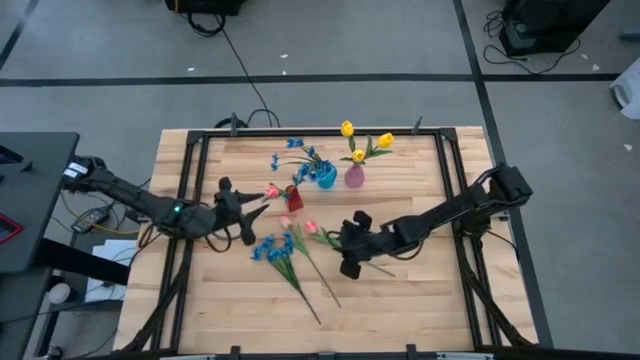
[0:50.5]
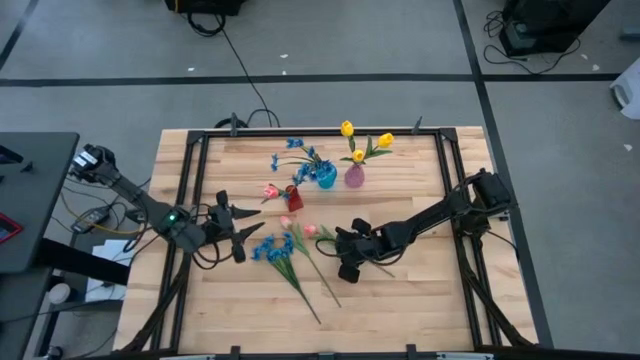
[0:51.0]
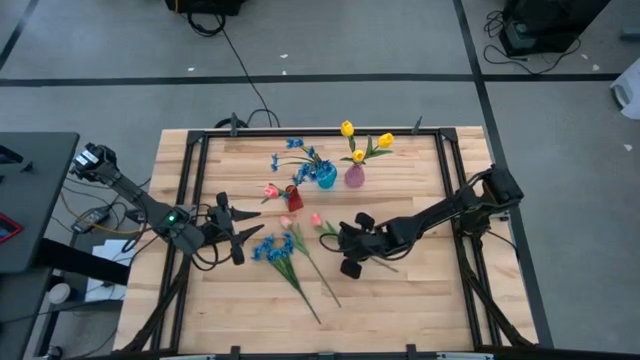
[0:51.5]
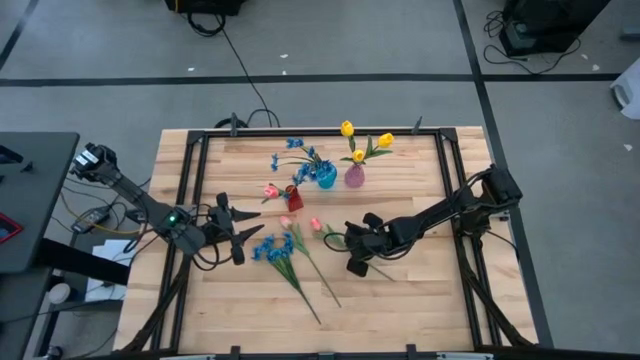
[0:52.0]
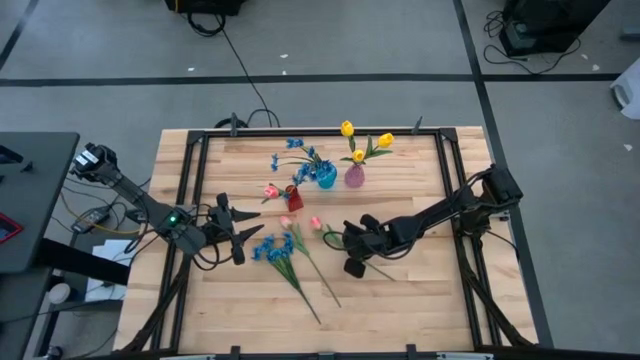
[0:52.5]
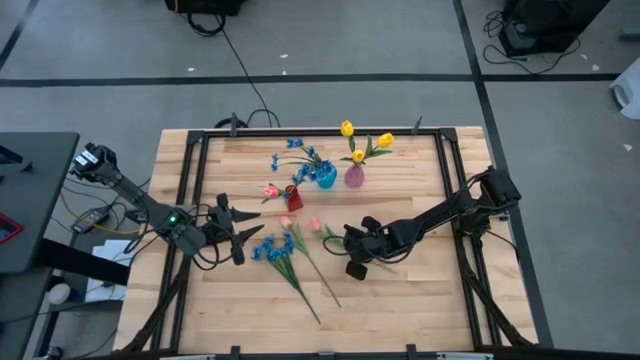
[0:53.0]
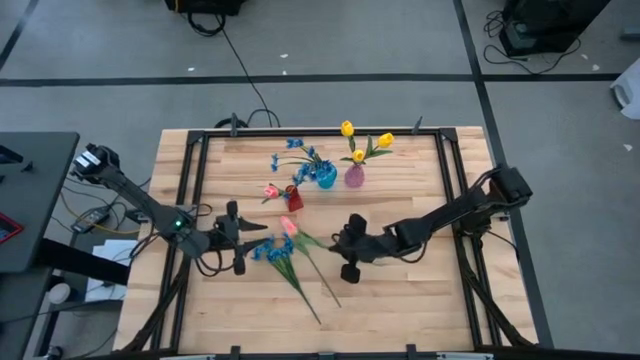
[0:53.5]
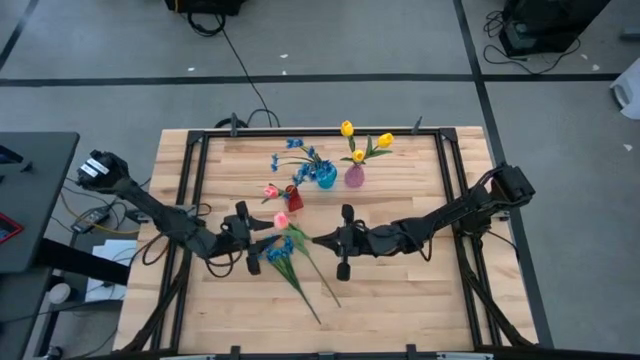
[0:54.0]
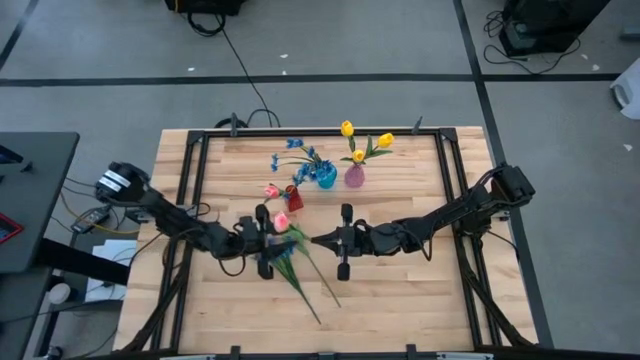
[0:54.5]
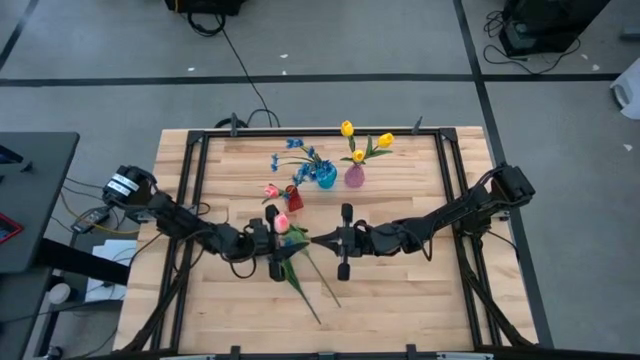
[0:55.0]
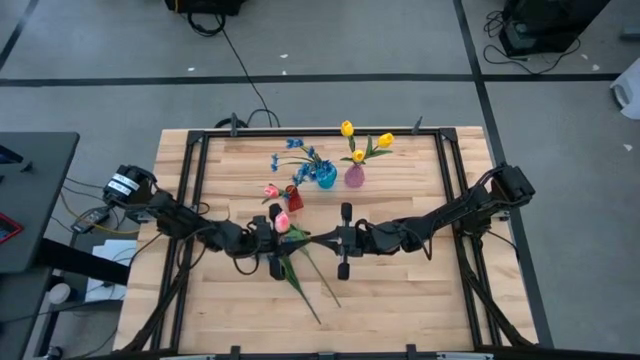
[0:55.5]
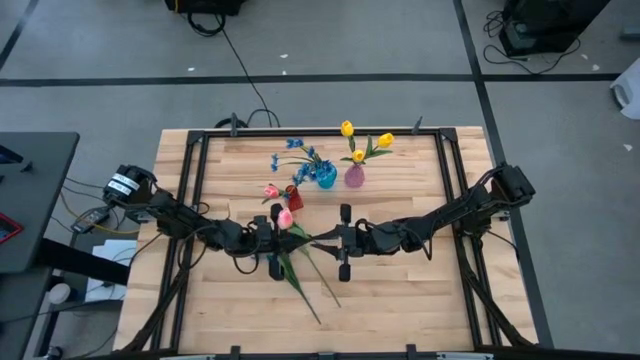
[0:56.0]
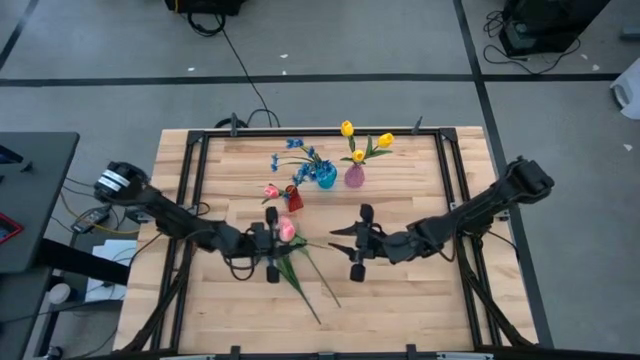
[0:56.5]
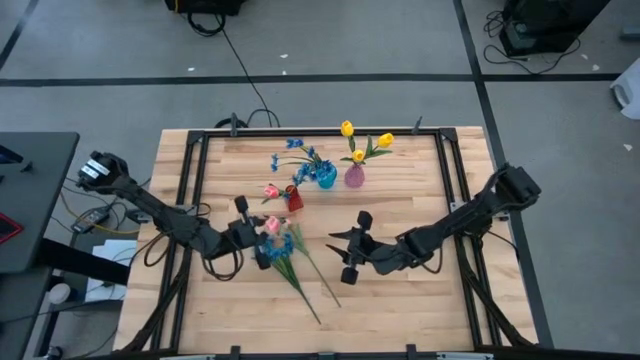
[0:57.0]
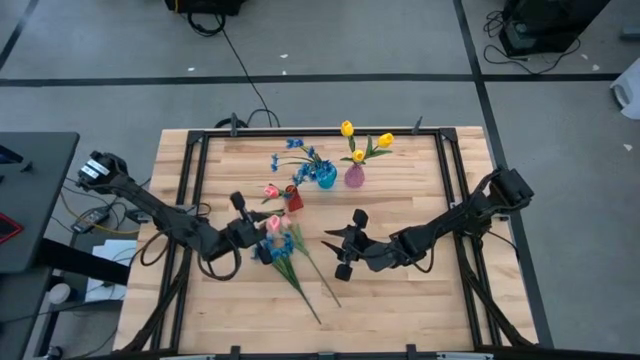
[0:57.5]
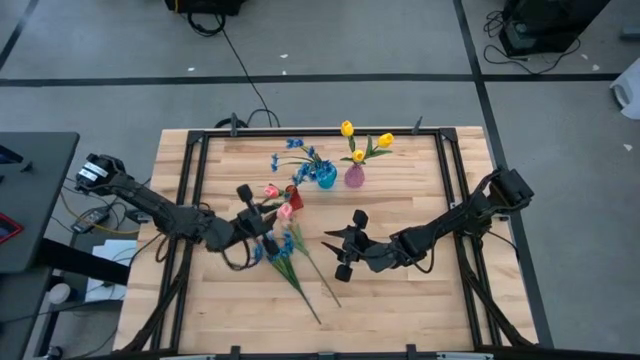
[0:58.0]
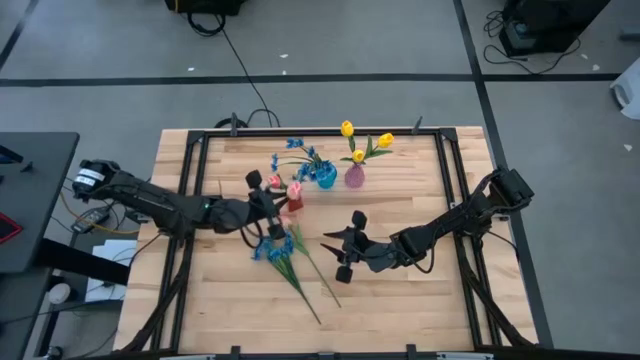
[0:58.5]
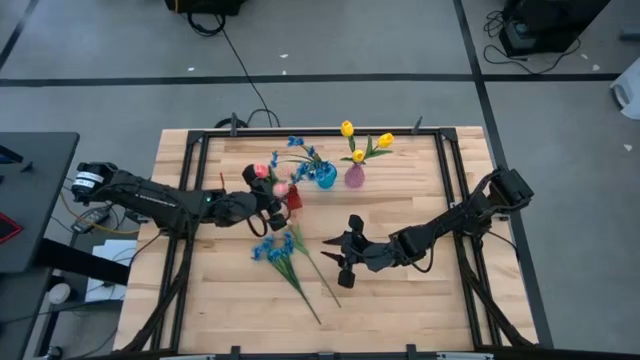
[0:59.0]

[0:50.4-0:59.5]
Task: Sort flowers into vase by color
Put the pink flower into the red vase

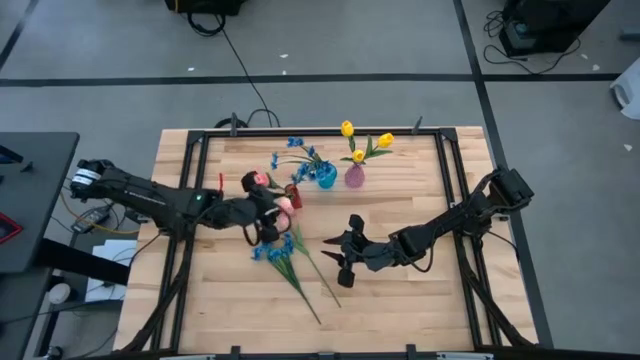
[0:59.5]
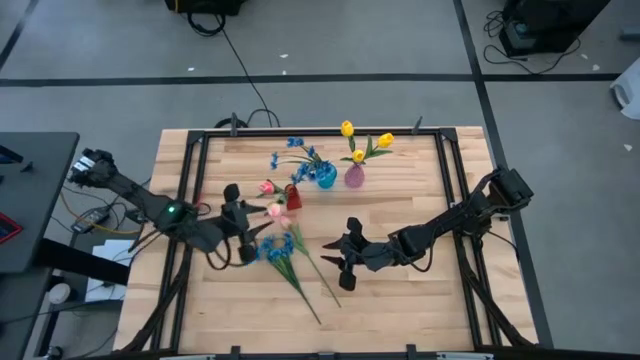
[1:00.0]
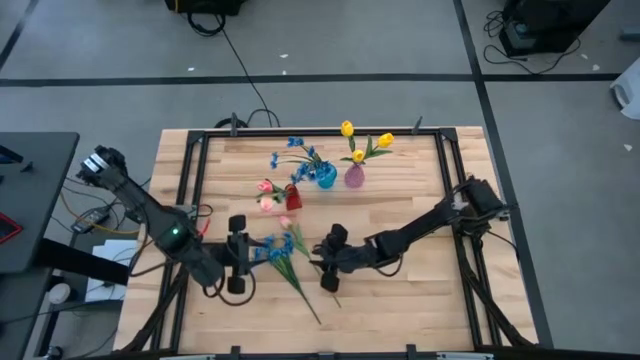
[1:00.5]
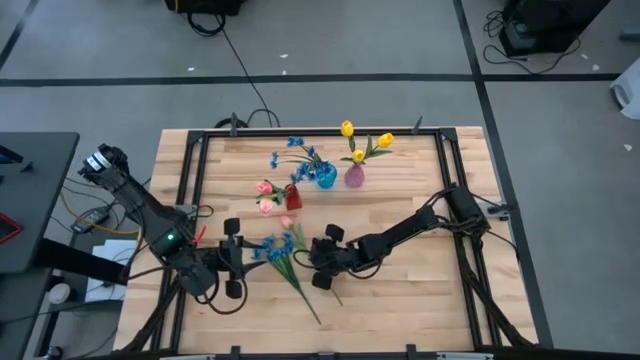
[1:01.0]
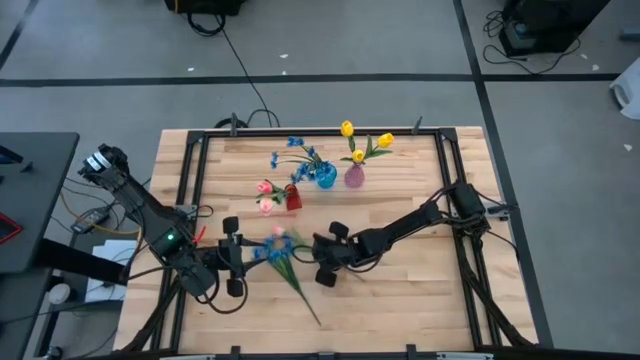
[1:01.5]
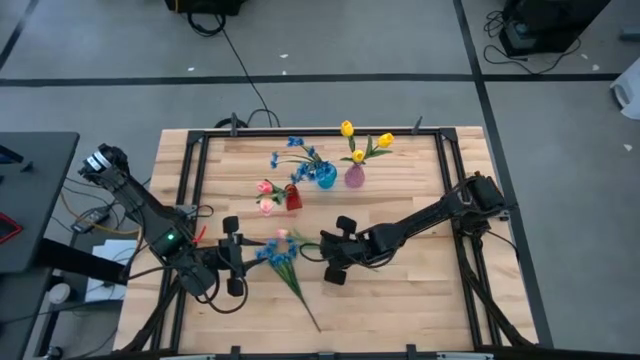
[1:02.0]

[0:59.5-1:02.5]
Put the pink flower into the red vase

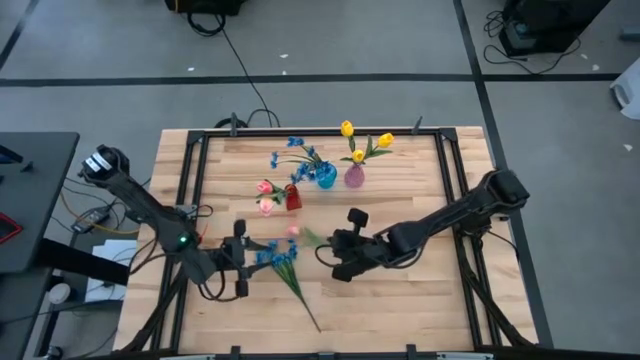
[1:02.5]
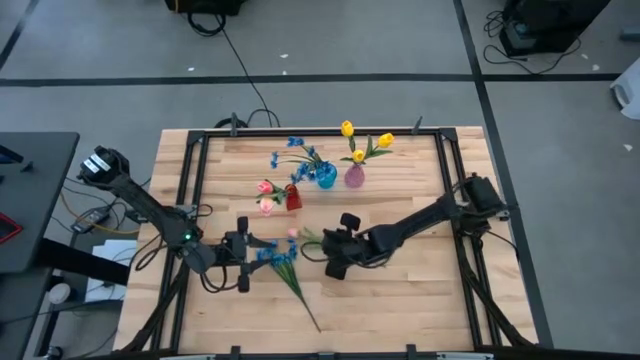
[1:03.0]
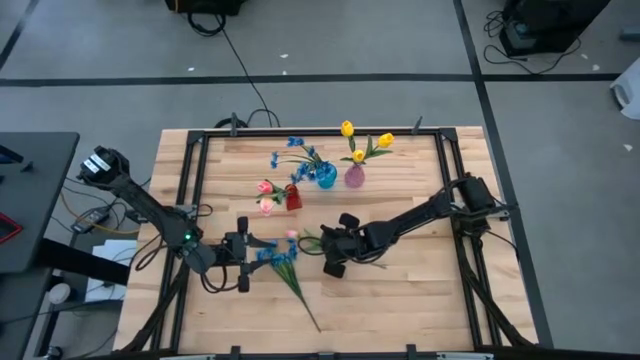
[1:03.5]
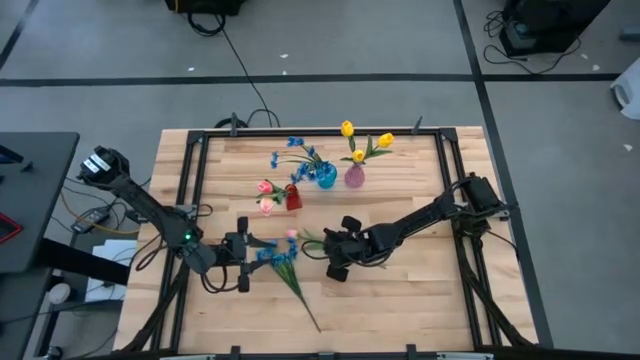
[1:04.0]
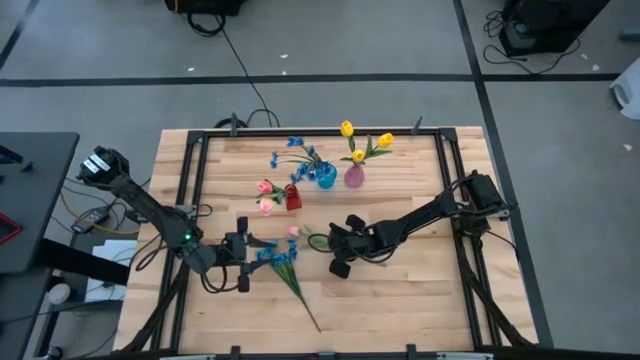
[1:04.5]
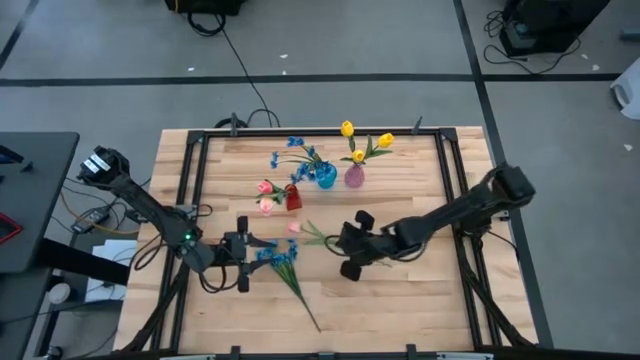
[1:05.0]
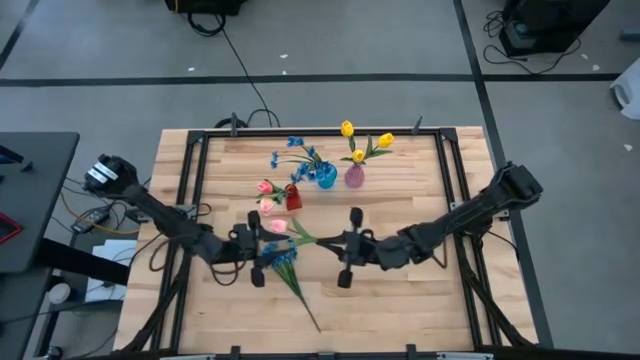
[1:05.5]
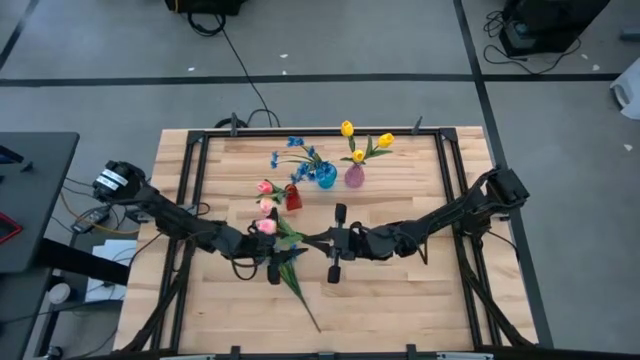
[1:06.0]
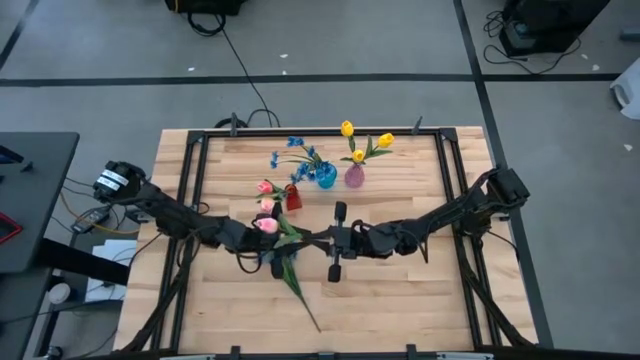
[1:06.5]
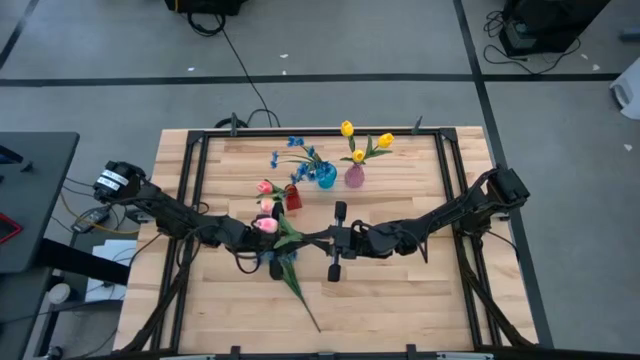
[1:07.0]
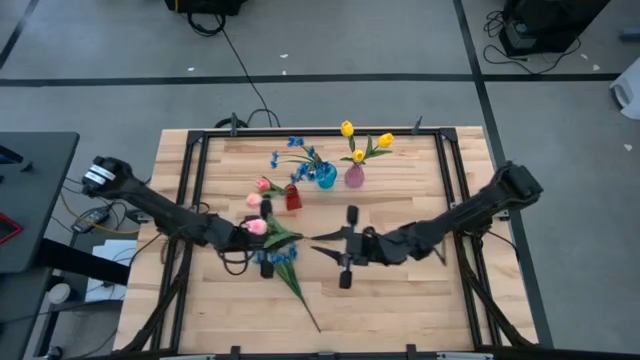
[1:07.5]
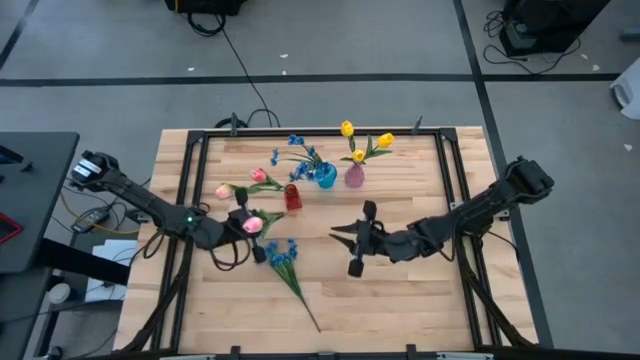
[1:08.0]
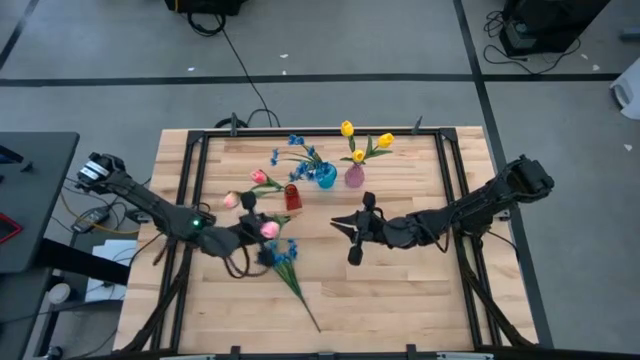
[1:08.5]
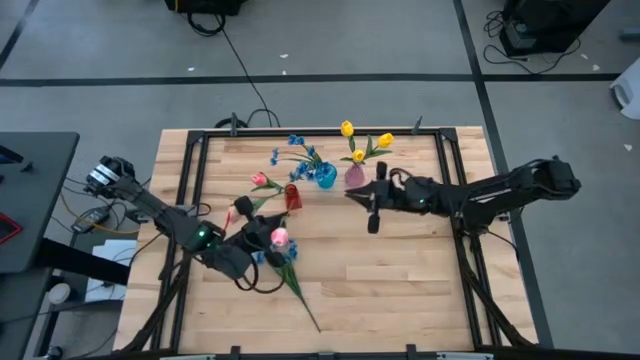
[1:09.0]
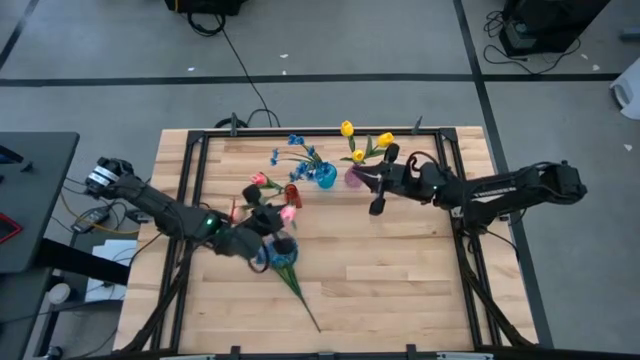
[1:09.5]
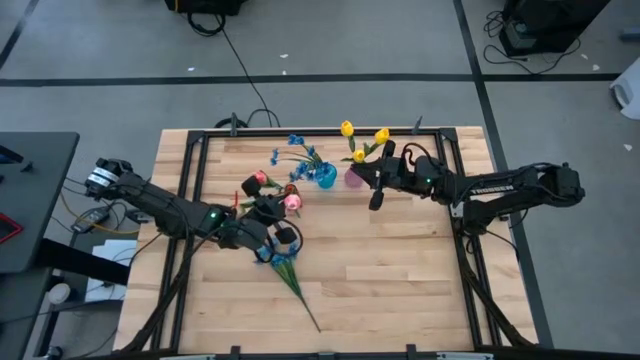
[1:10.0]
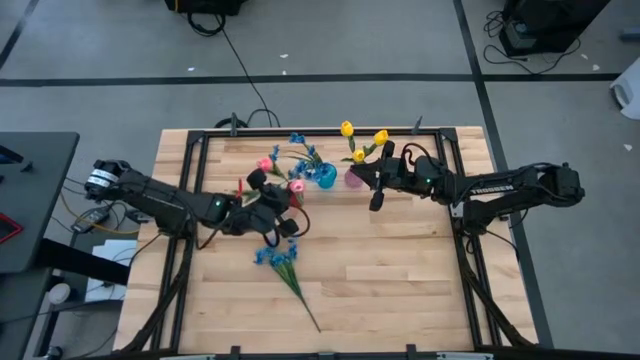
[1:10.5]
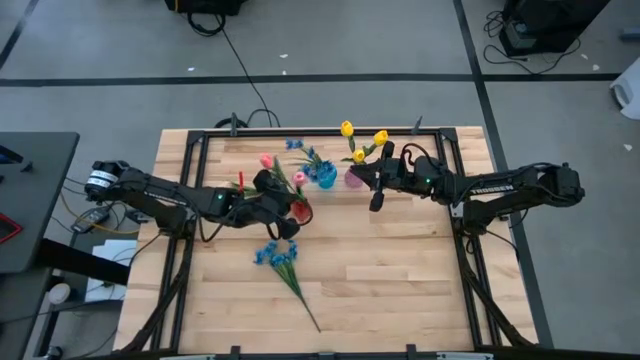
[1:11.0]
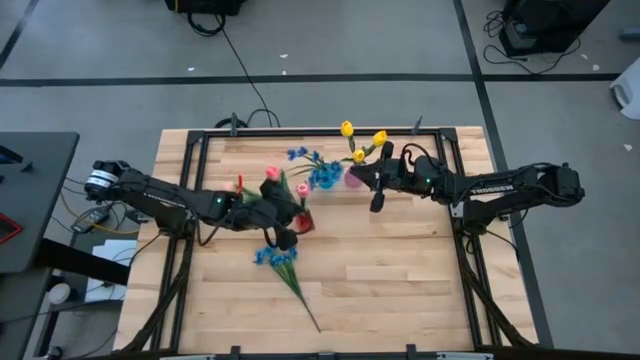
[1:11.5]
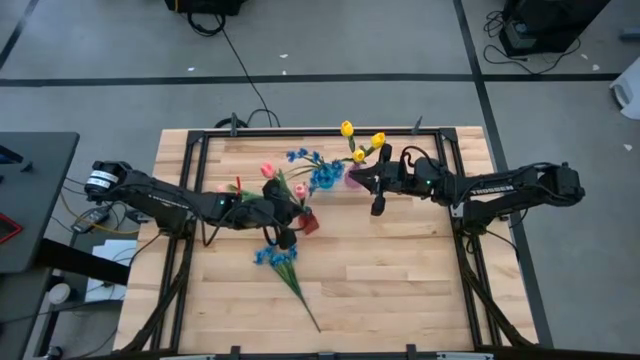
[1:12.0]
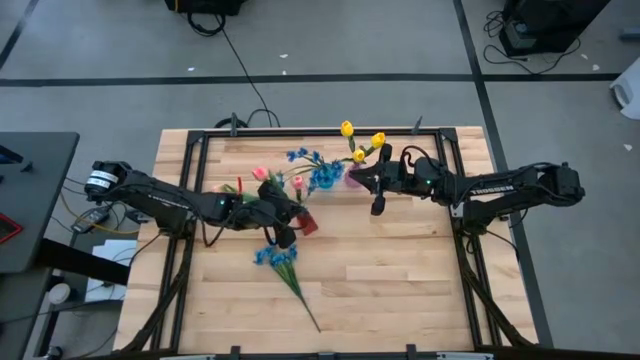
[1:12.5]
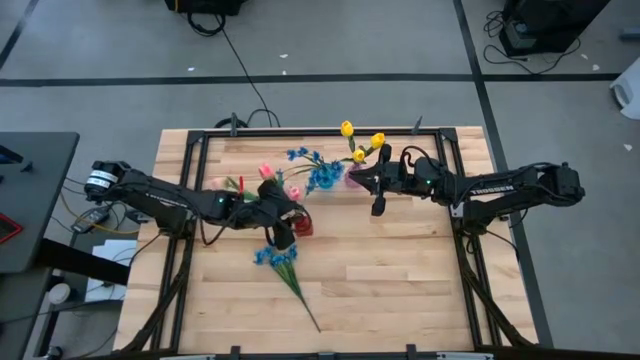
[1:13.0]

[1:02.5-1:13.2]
Put the pink flower into the red vase
